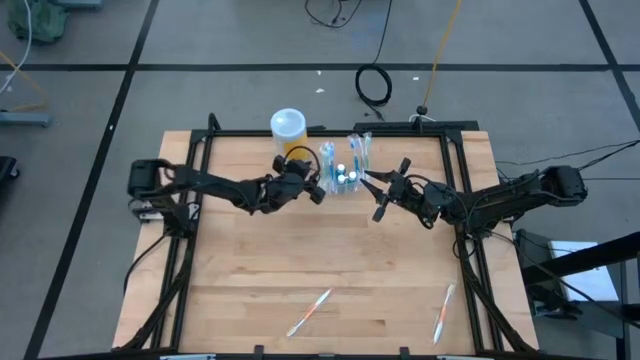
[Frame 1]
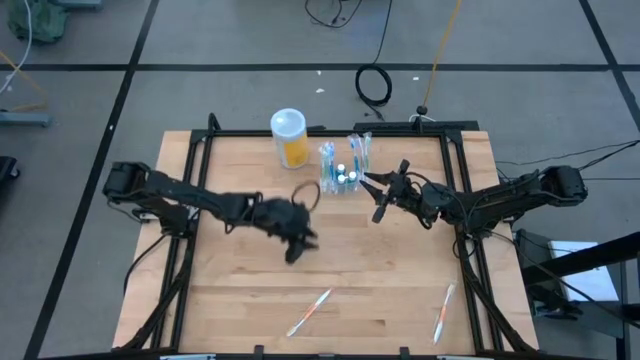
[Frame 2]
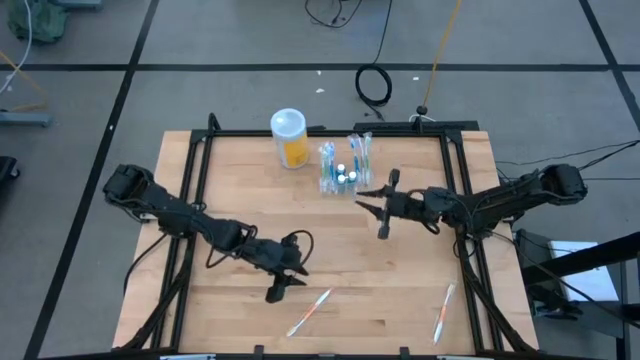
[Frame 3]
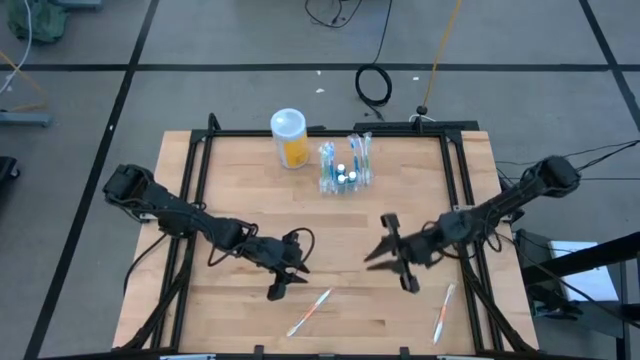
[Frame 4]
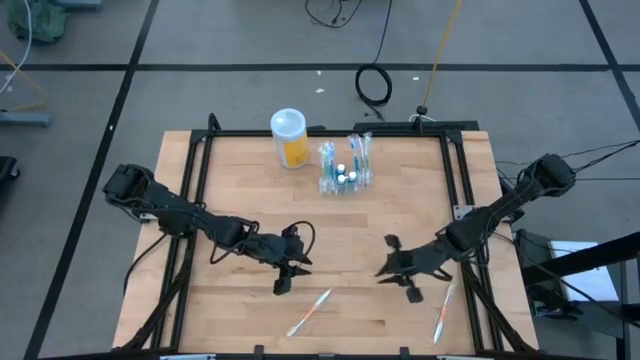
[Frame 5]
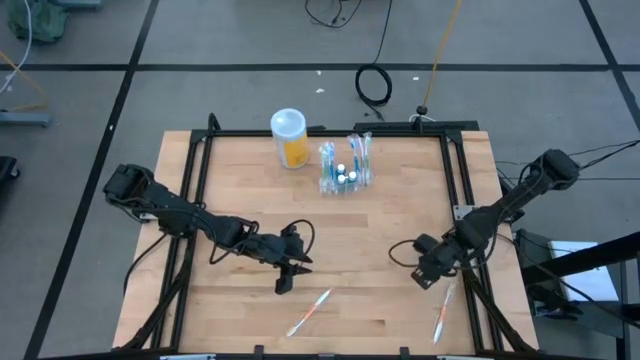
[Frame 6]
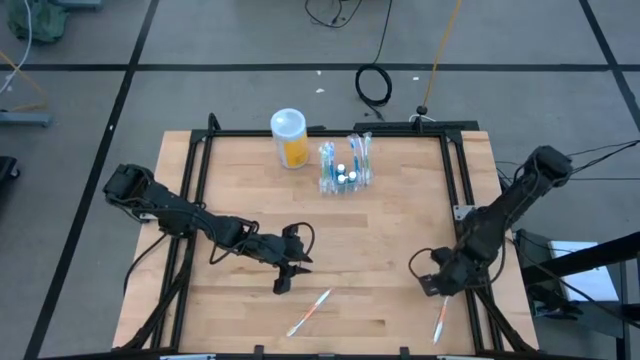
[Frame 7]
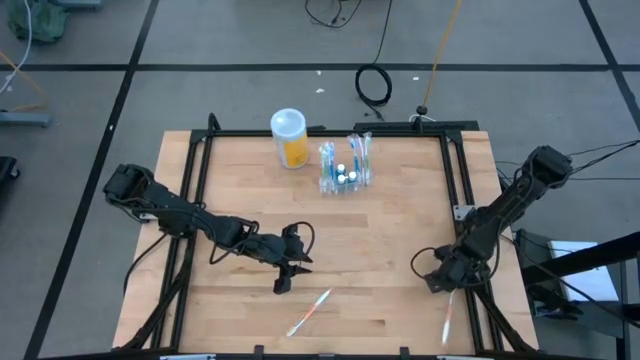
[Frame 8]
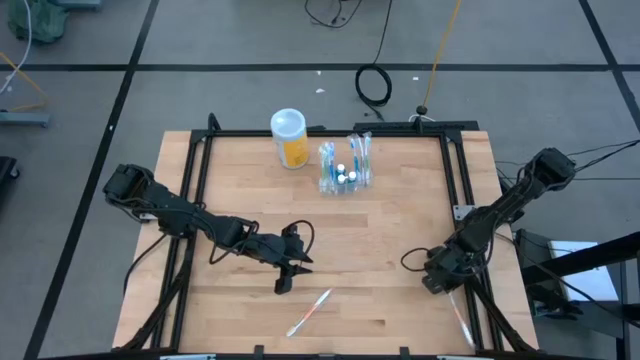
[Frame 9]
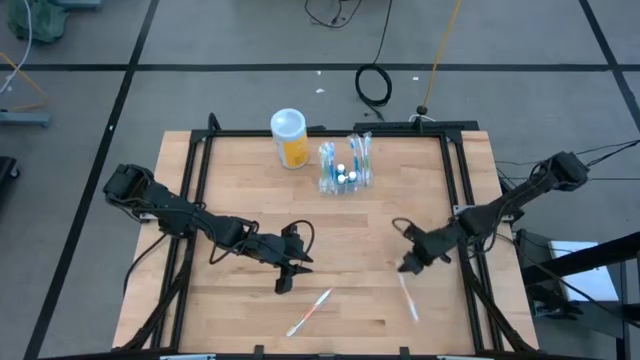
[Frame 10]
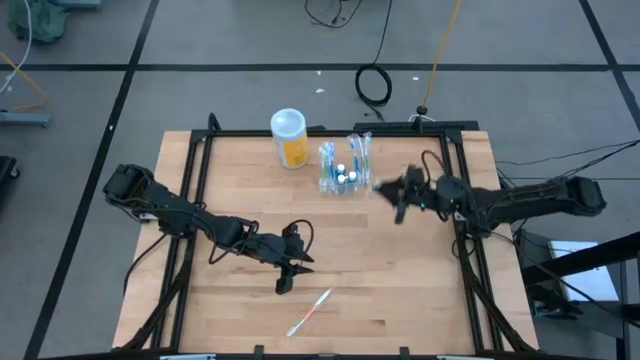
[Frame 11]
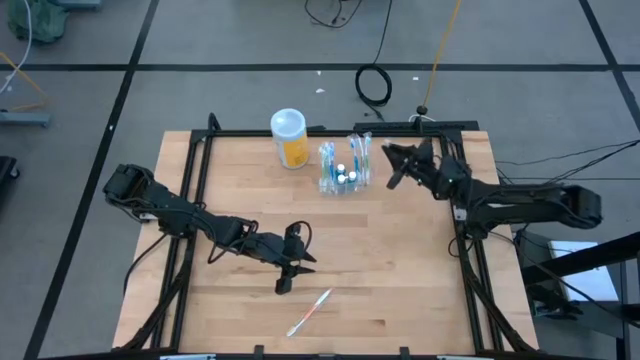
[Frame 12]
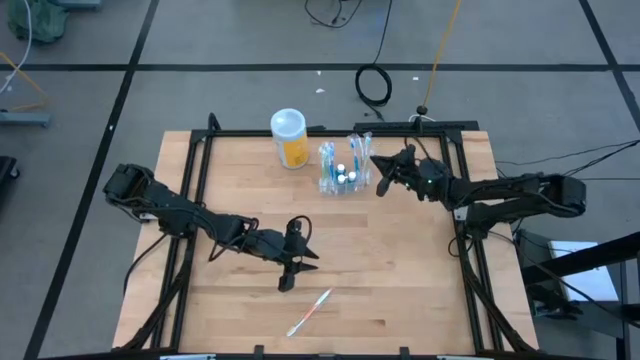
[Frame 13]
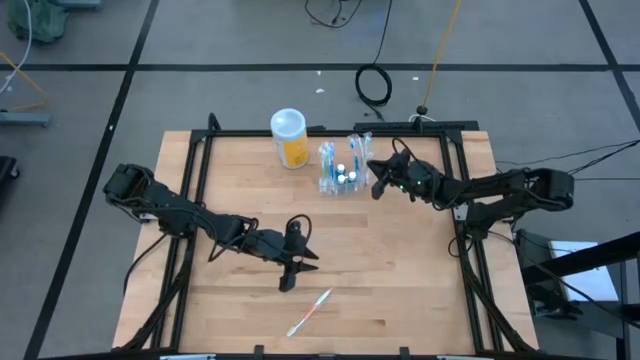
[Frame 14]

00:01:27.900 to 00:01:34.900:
Task: Pick & Place toothbrushing station
Put the right orange toothbrush into the transparent organizer

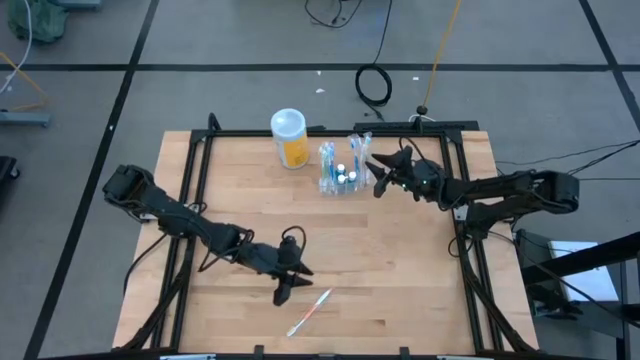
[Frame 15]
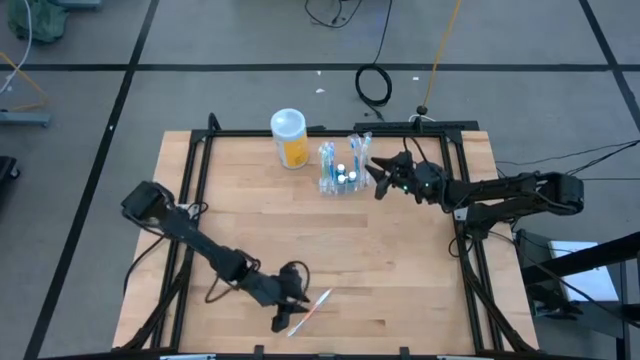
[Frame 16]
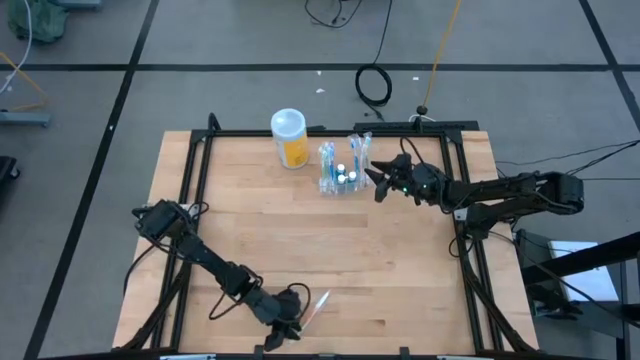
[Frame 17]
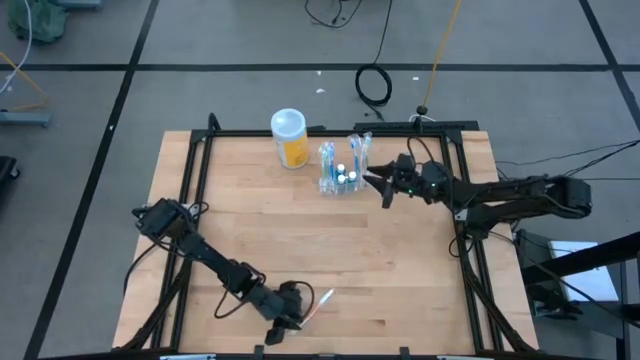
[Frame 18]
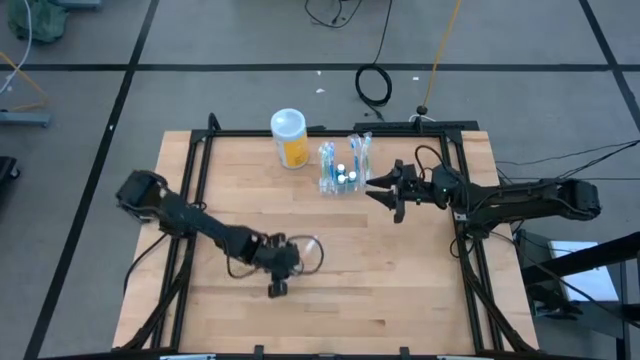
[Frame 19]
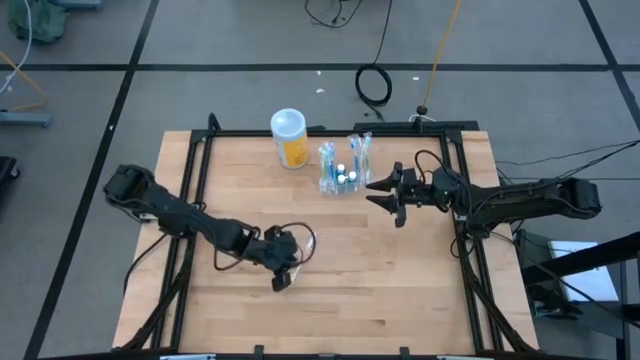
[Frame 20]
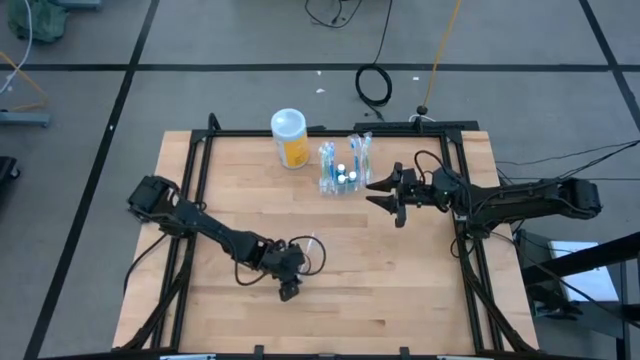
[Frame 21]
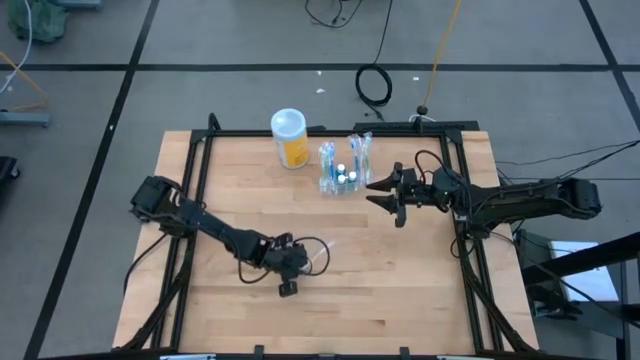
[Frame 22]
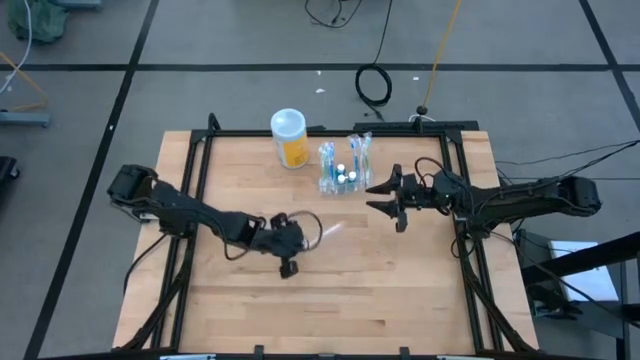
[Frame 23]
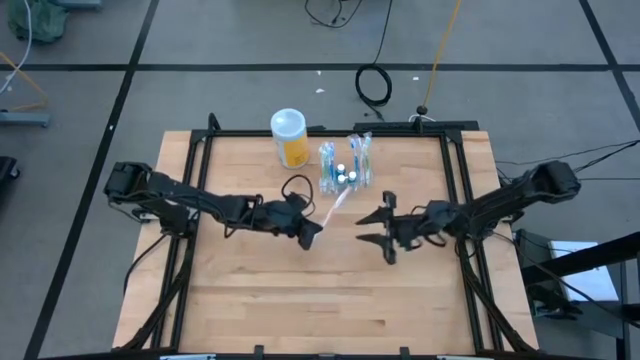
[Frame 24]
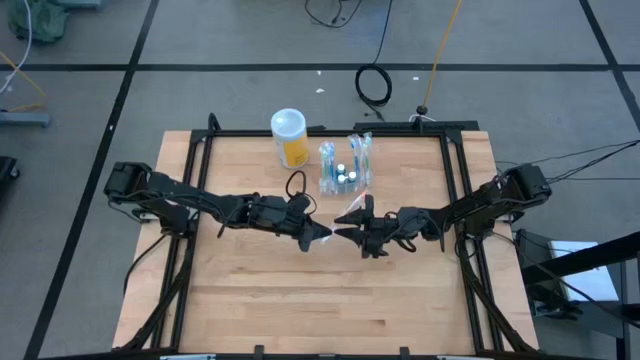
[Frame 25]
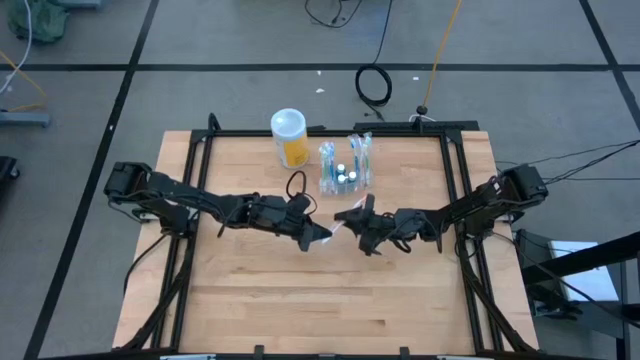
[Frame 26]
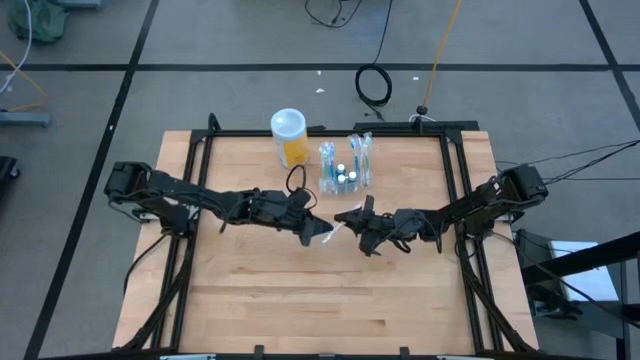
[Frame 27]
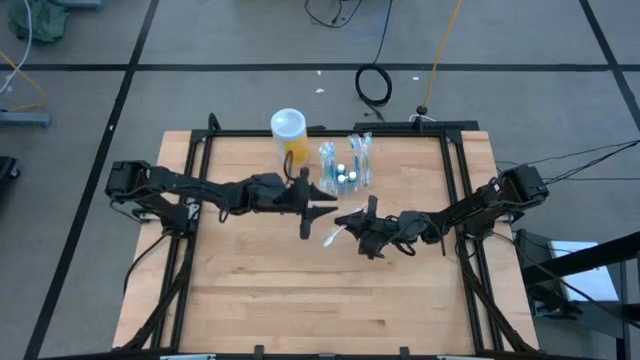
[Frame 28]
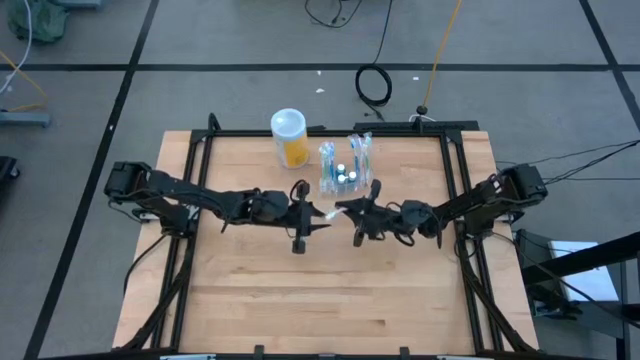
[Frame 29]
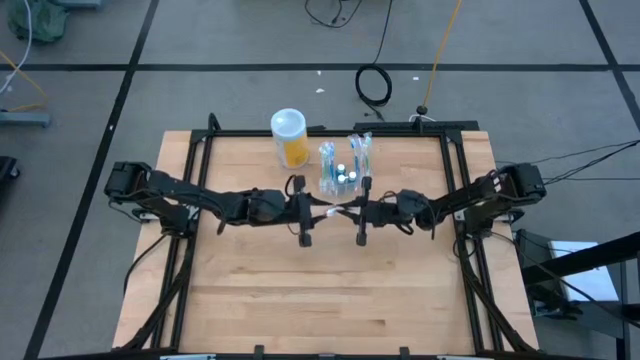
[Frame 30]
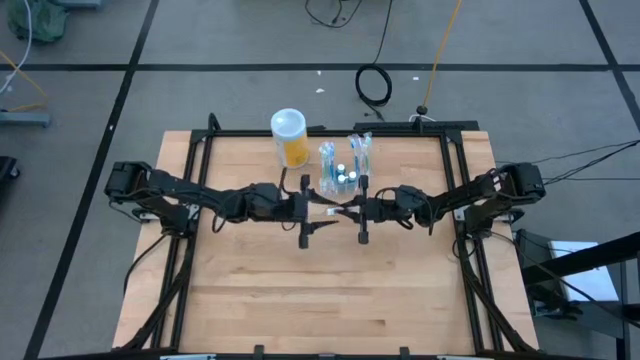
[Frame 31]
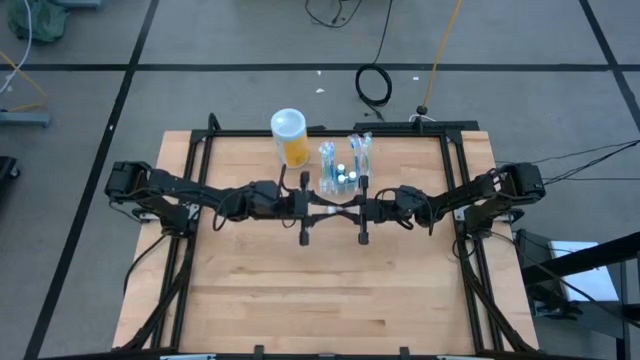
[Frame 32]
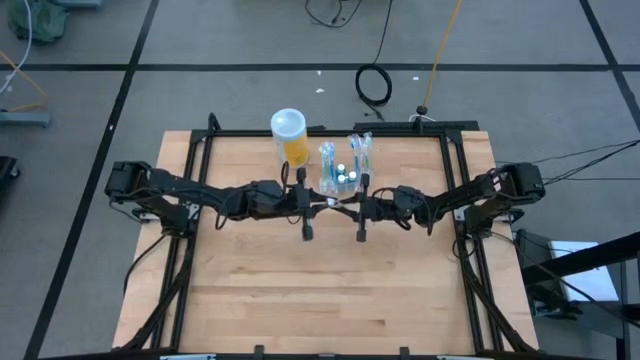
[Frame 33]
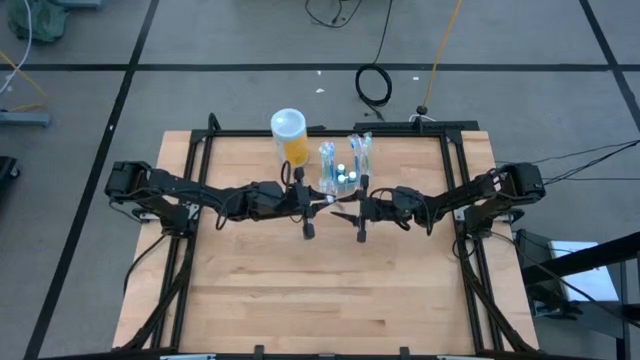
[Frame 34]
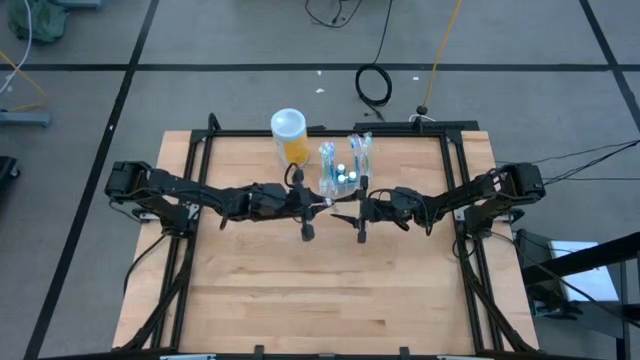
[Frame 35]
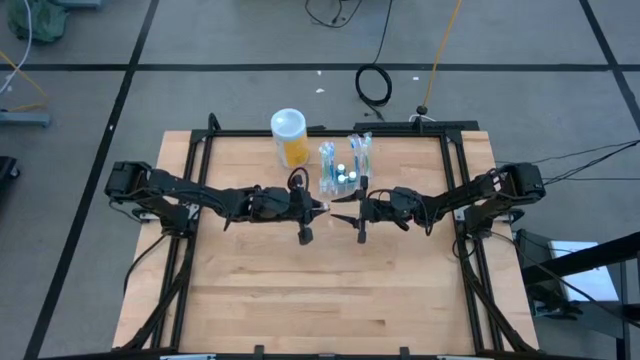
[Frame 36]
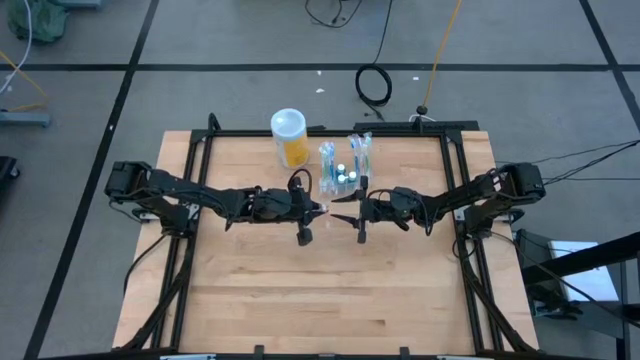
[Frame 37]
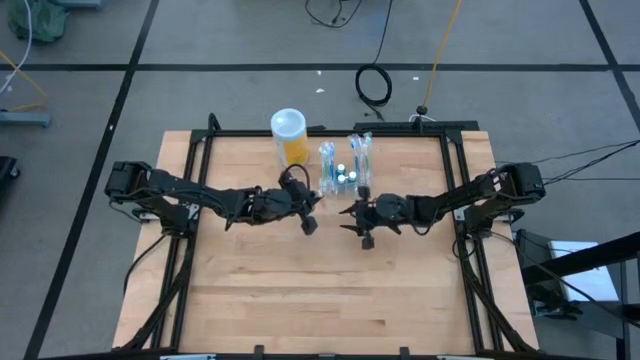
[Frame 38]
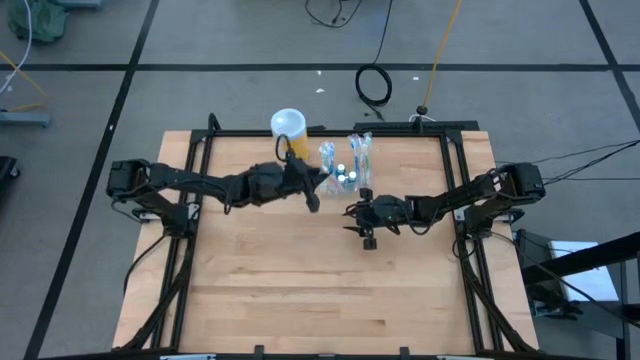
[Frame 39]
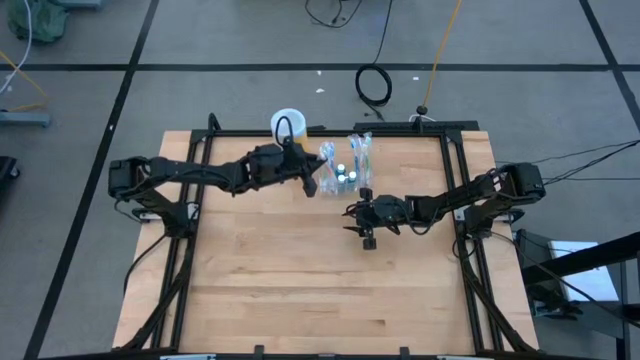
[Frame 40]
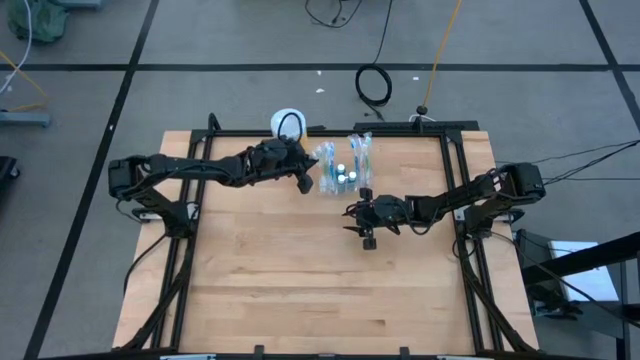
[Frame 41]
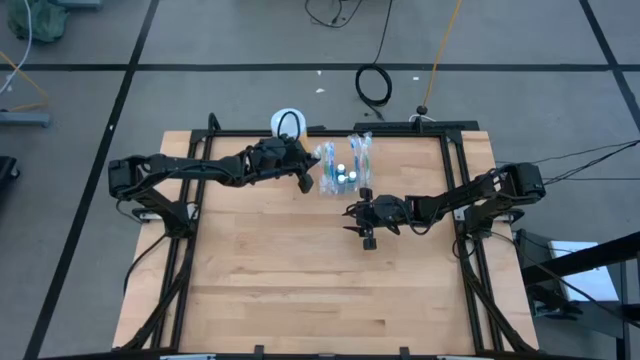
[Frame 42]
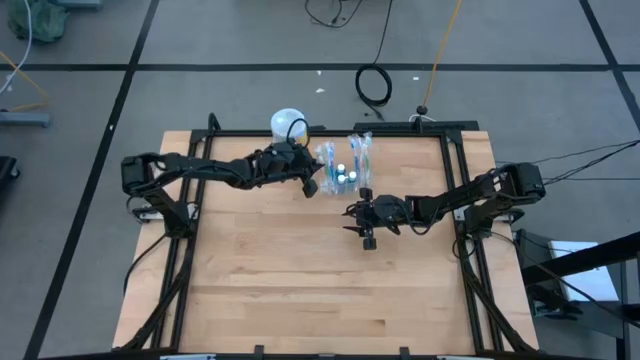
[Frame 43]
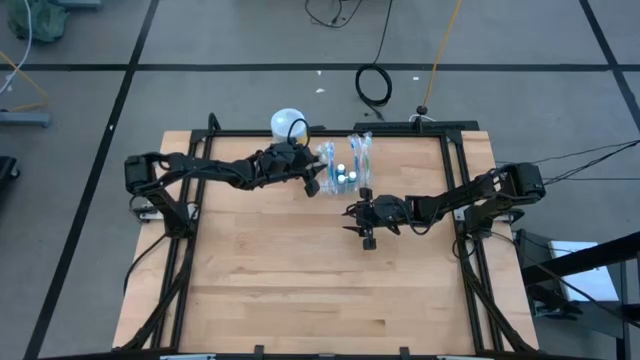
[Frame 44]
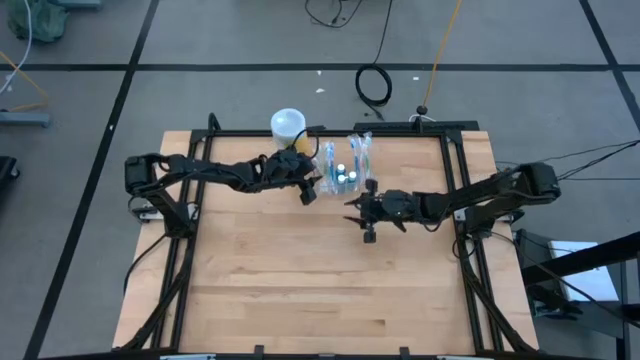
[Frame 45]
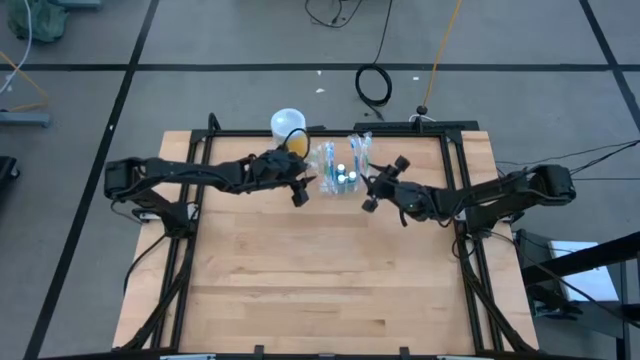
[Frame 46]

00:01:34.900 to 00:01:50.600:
Put the orange toothbrush into the transparent organizer
